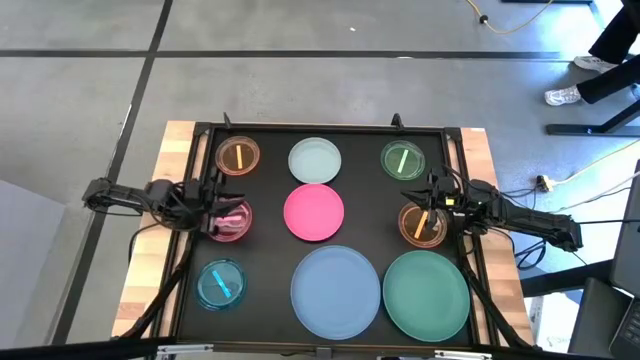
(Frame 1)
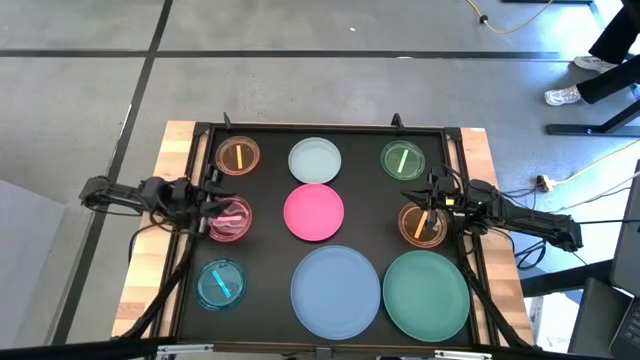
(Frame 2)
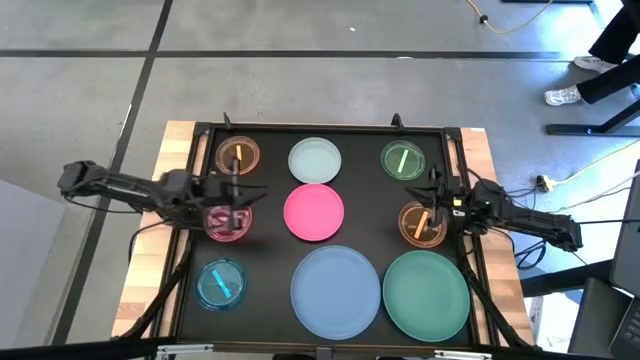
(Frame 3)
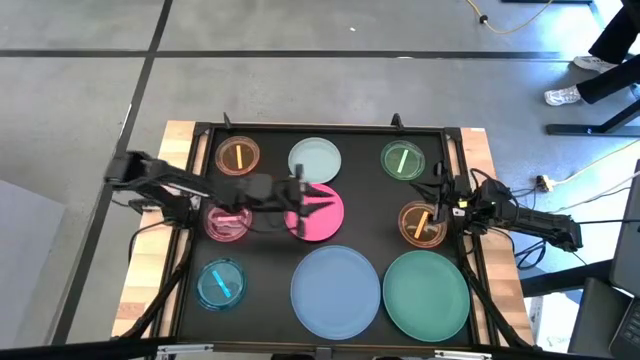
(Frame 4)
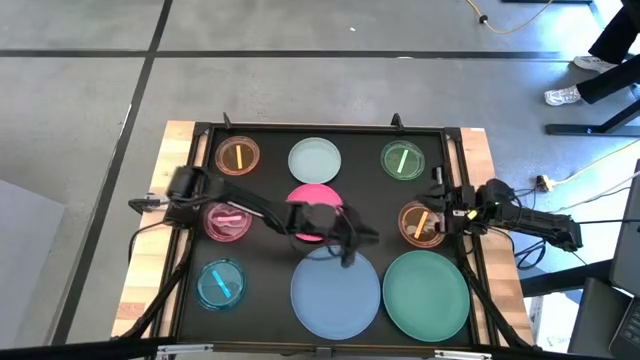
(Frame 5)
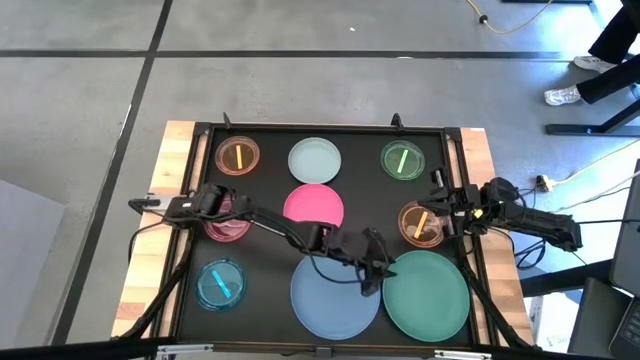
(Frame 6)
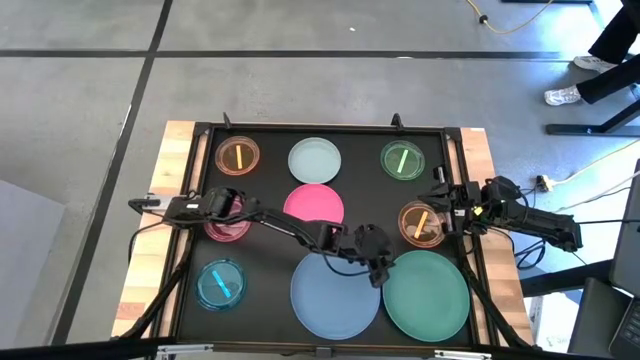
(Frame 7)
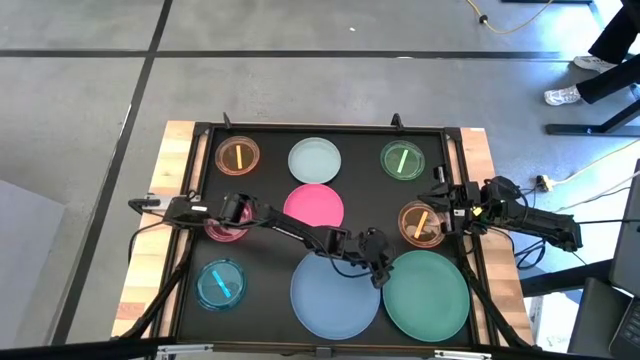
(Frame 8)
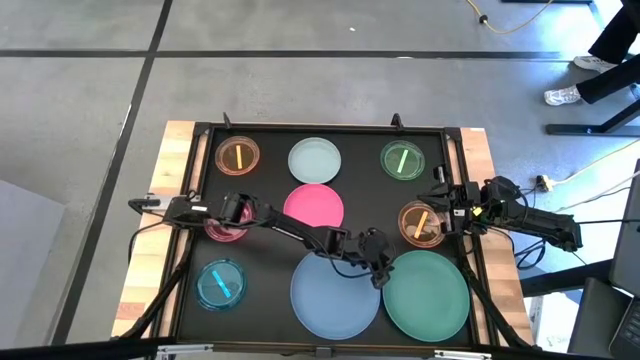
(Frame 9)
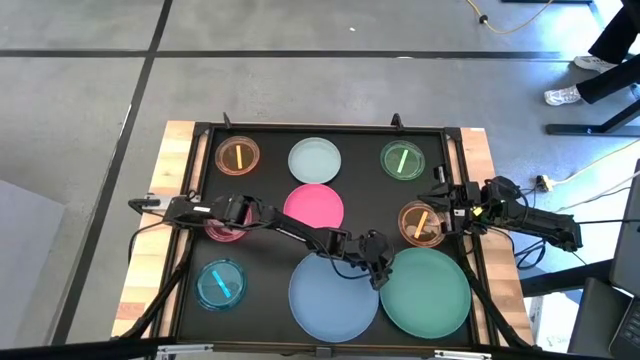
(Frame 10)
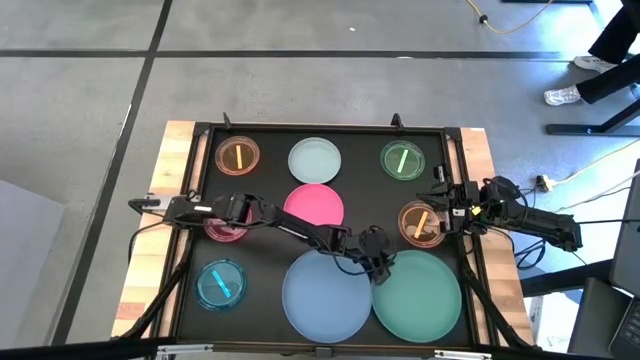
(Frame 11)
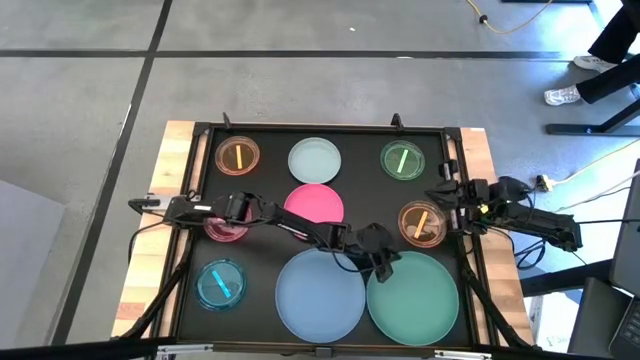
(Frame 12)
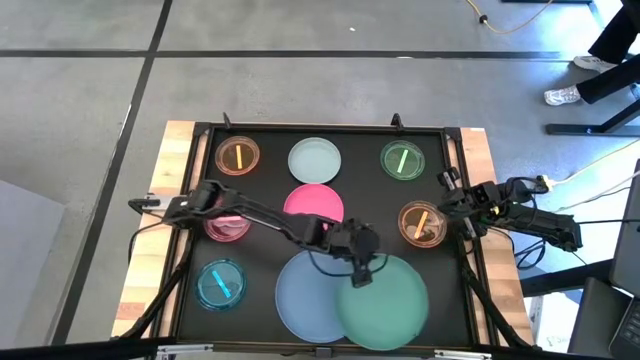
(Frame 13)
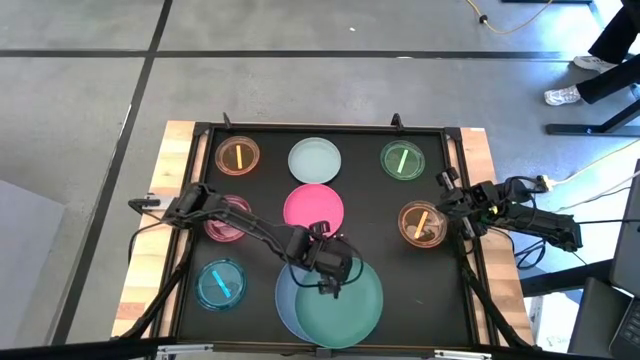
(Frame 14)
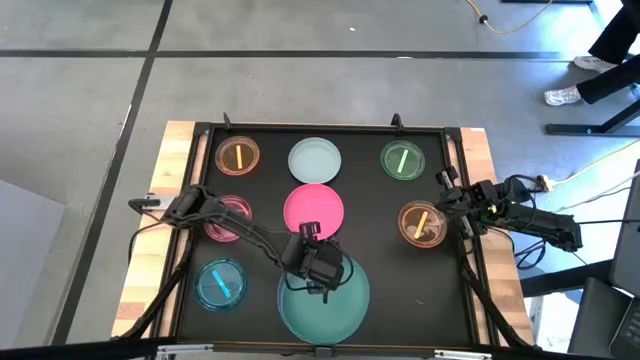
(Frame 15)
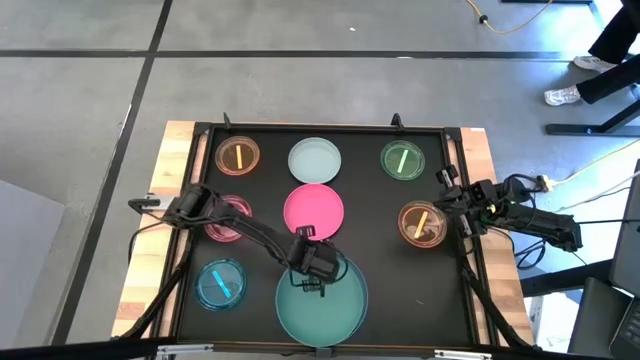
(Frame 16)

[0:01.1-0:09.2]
Task: Stack plastic plates
Stack the green plate on the blue plate

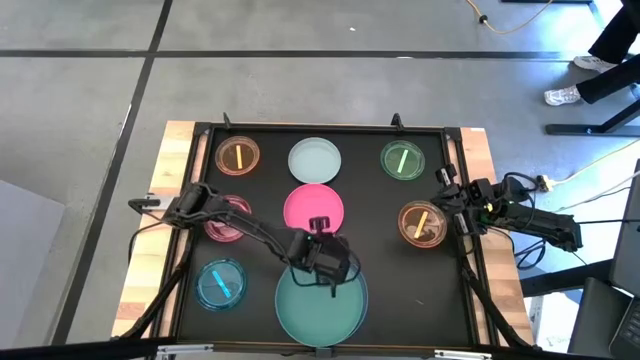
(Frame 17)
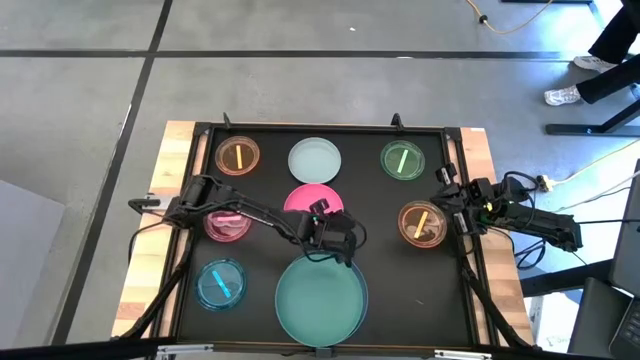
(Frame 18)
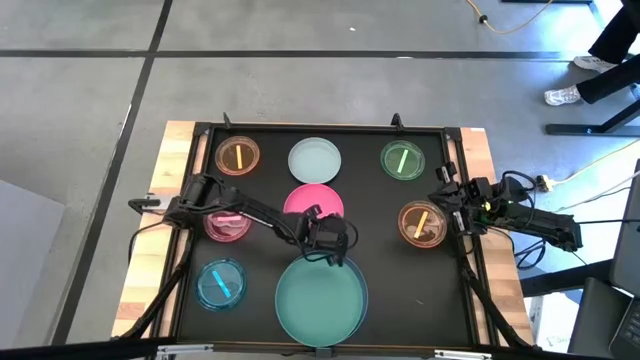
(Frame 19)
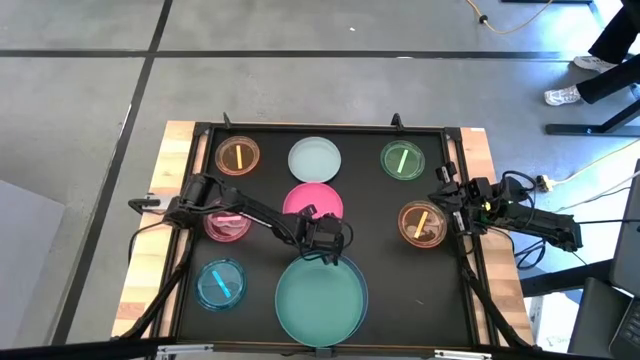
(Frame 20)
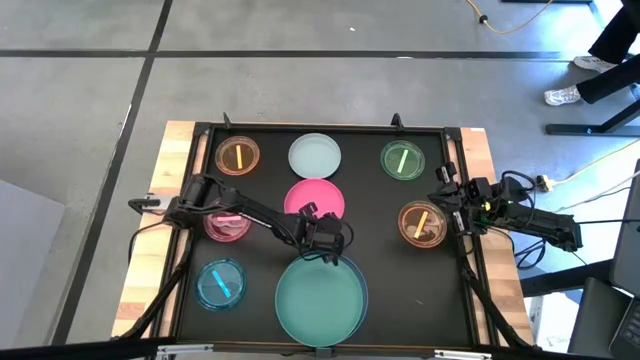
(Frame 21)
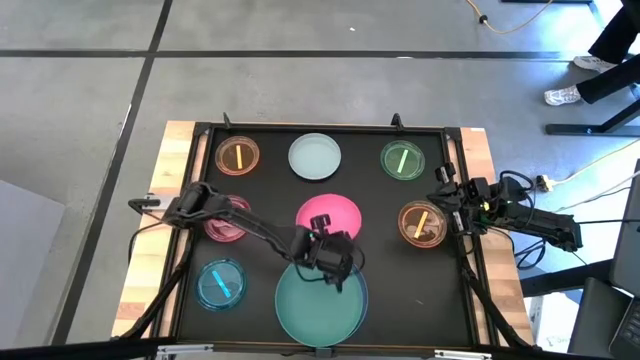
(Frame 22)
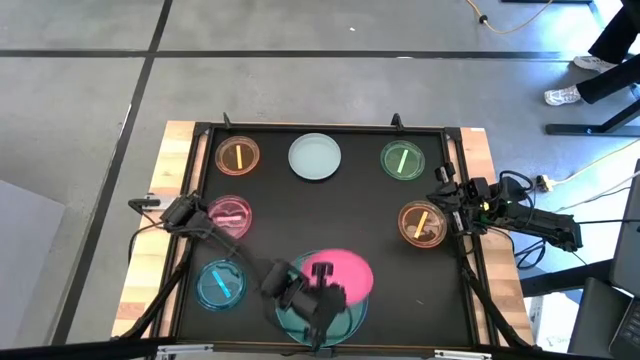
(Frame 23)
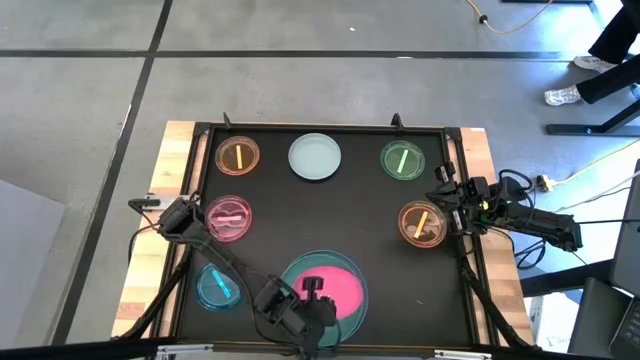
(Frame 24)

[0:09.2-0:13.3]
Stack the pink plate on the green plate

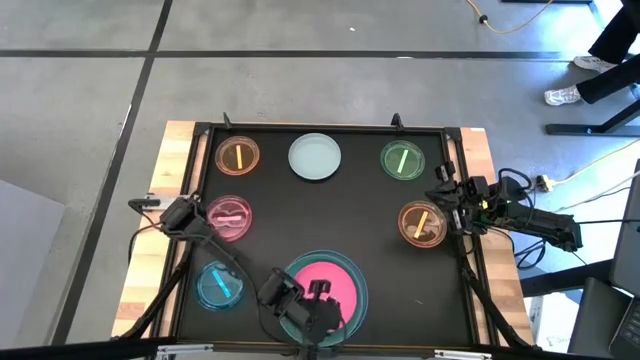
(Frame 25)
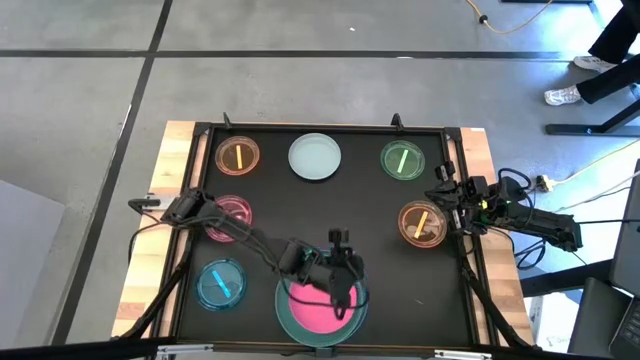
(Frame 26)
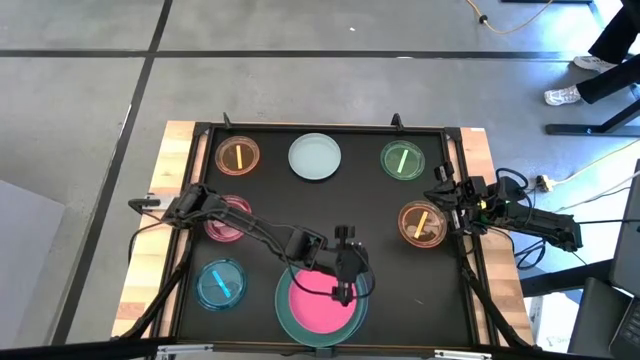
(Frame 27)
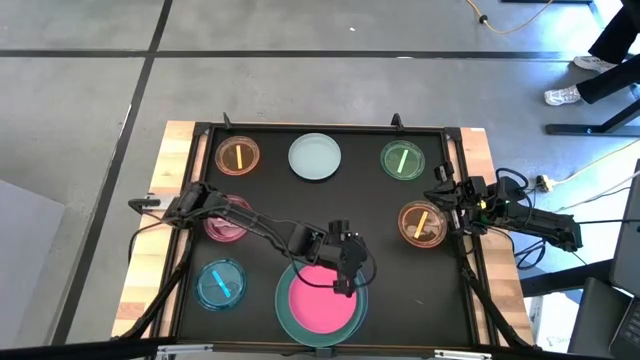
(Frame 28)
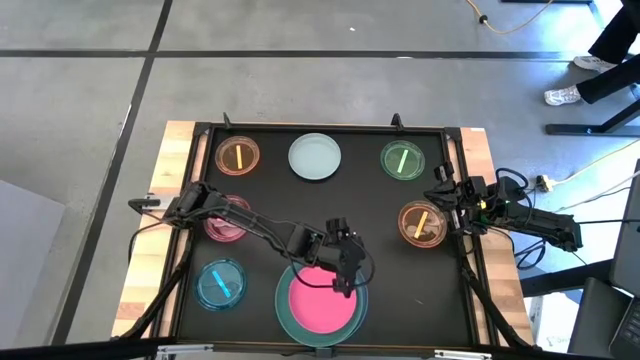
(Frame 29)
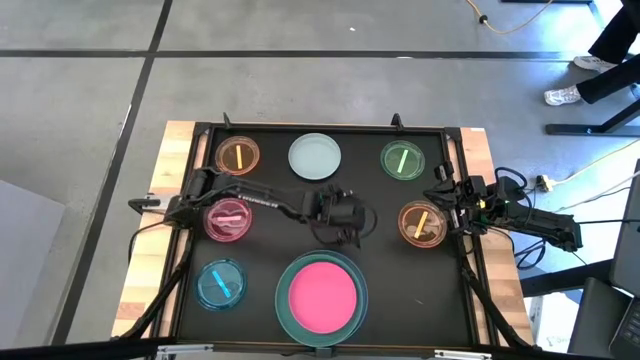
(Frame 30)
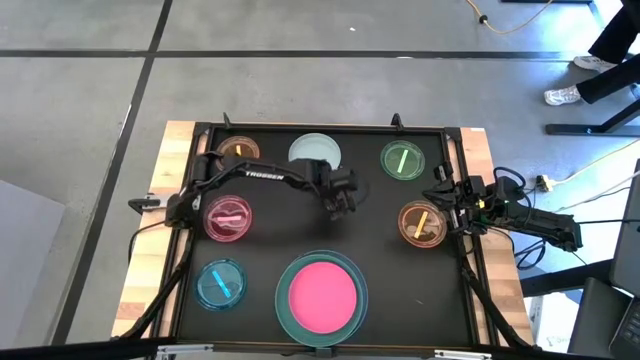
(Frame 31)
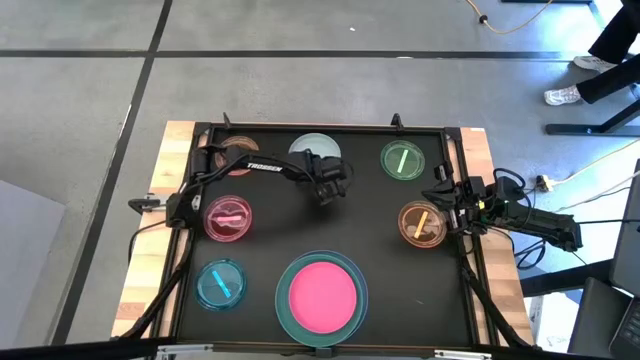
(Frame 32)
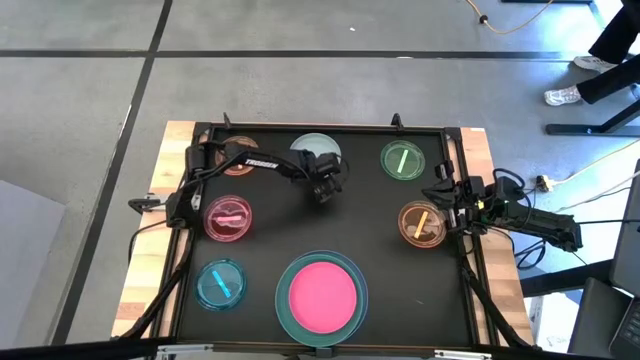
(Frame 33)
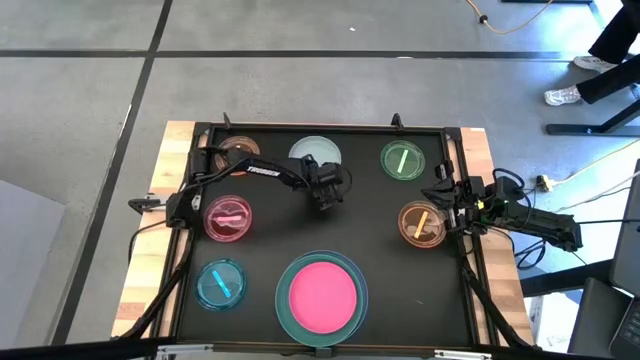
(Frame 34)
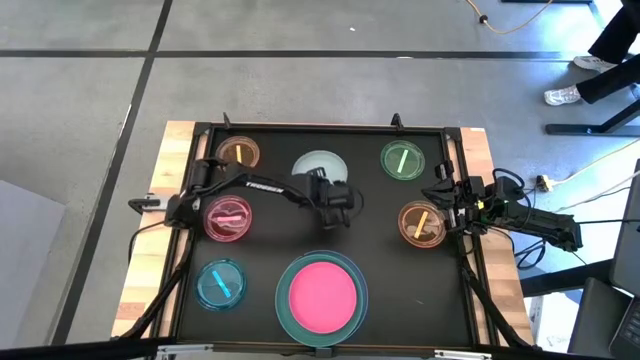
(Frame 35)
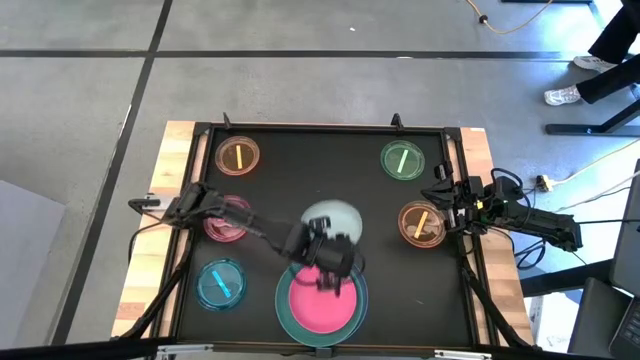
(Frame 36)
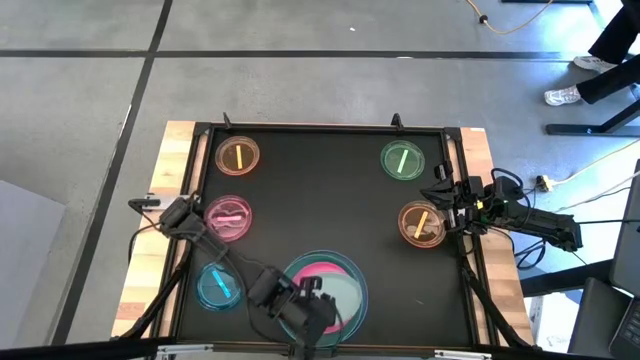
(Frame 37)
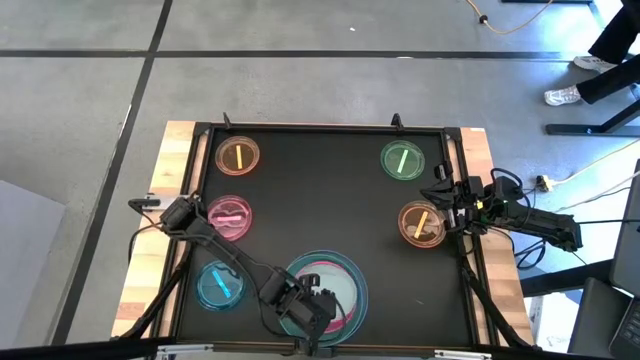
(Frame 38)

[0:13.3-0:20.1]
Stack the gray plate on the pink plate

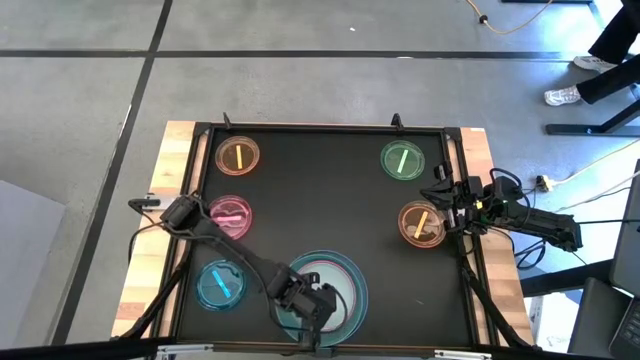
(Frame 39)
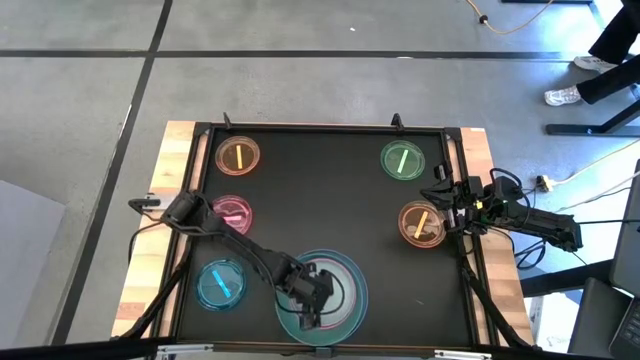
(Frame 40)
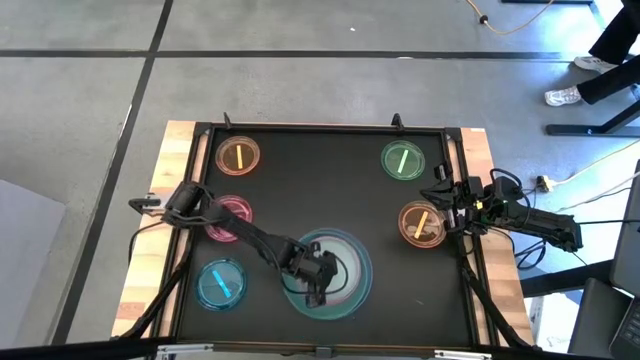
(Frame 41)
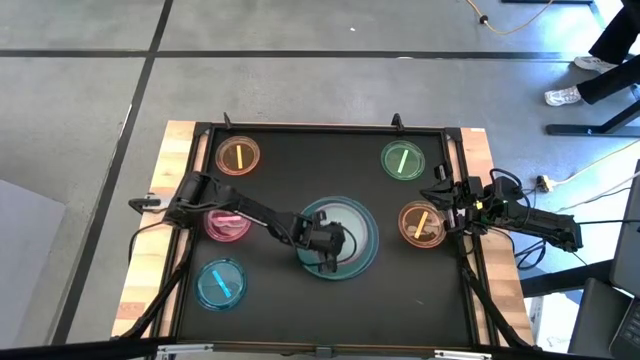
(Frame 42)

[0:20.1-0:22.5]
Move the stacked plates to the center of the table

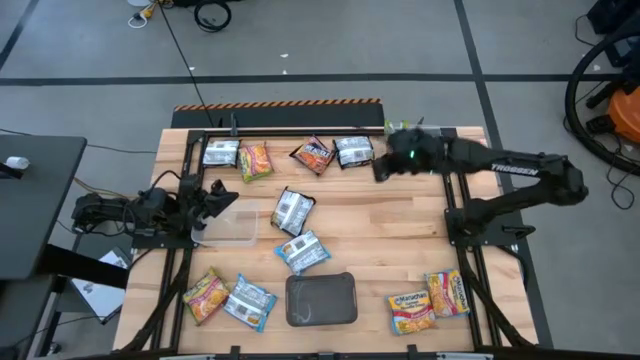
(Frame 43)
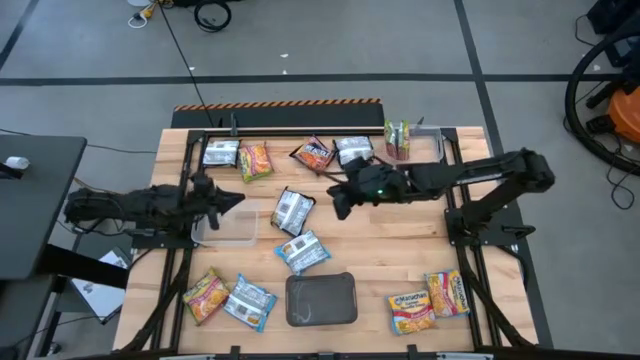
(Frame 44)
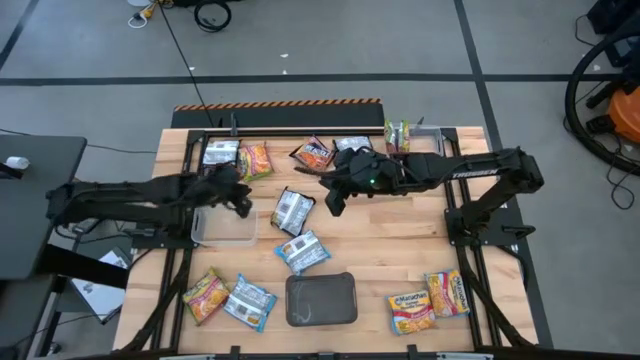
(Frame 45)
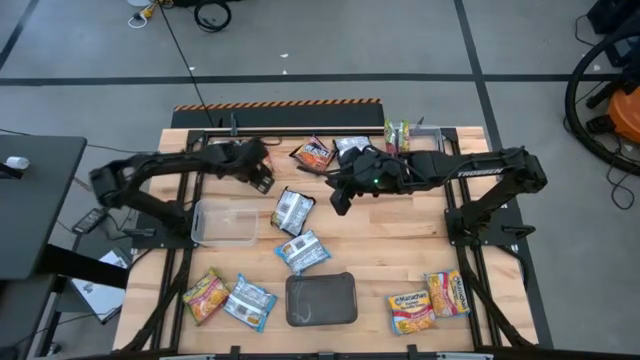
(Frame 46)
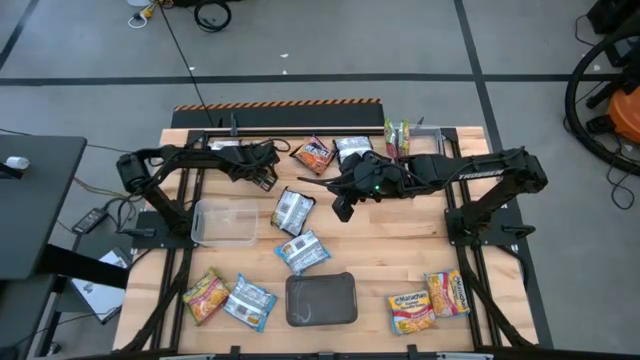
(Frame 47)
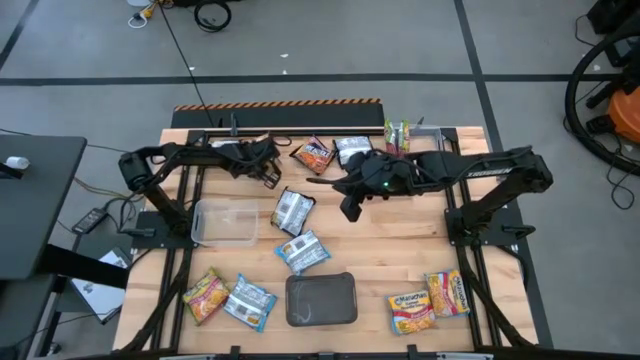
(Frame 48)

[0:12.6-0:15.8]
Task: Sort Maruchan noodles
Put the green noodle pack into the top transparent bin
